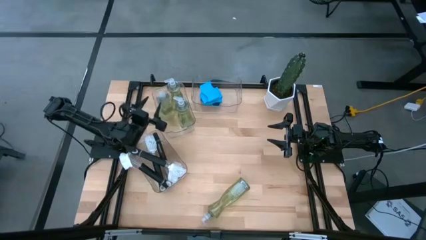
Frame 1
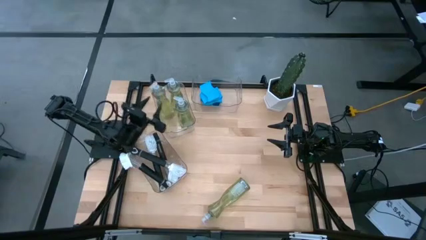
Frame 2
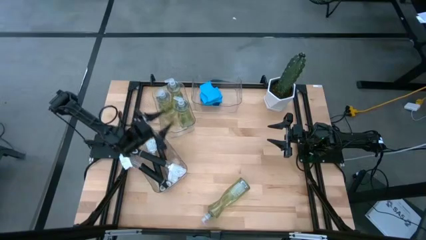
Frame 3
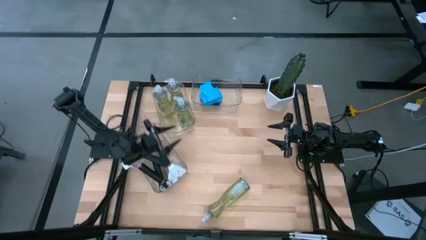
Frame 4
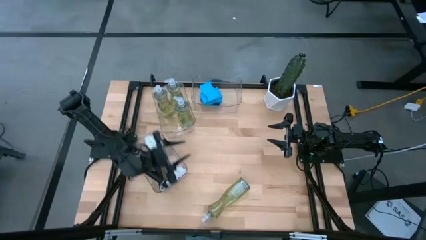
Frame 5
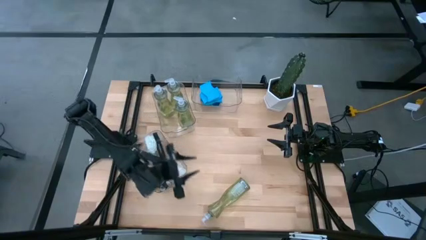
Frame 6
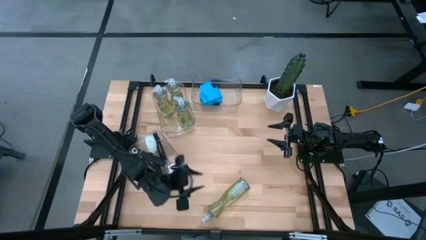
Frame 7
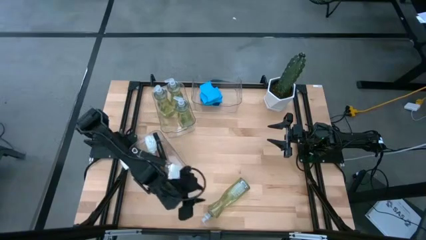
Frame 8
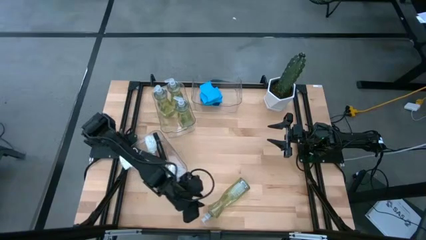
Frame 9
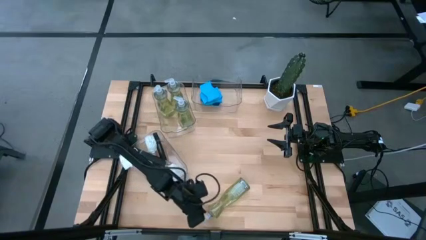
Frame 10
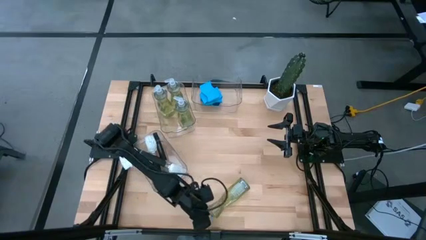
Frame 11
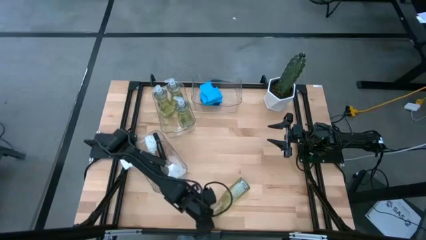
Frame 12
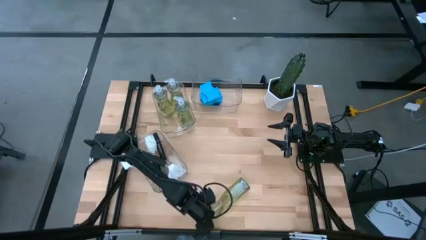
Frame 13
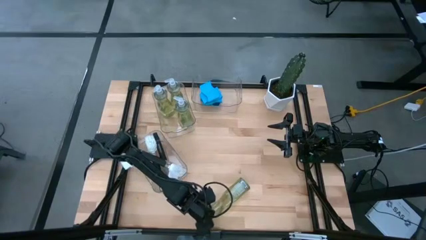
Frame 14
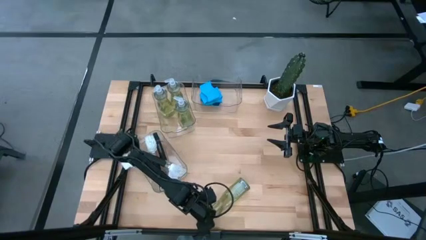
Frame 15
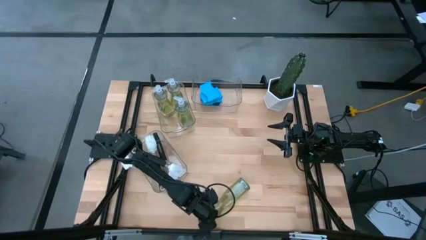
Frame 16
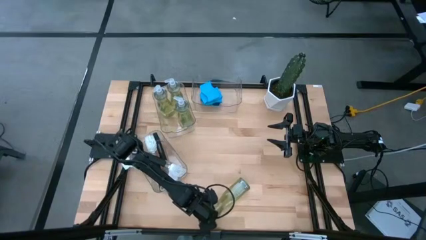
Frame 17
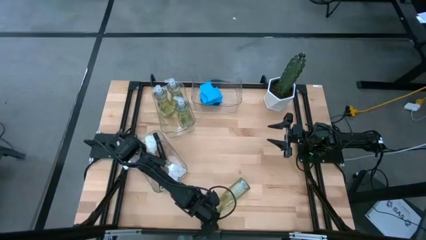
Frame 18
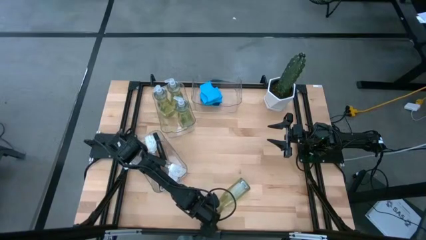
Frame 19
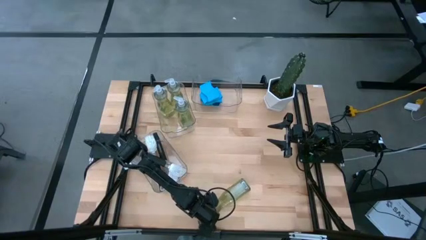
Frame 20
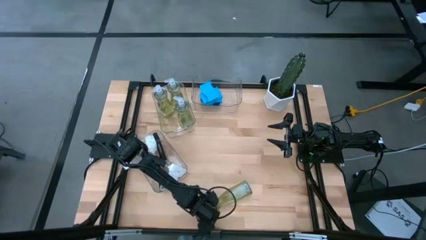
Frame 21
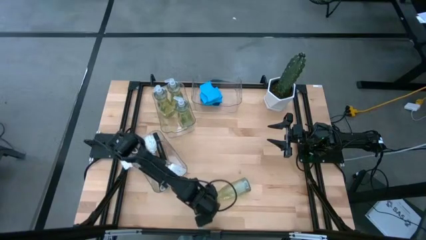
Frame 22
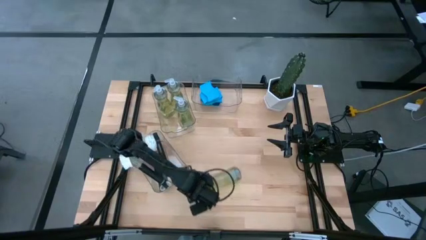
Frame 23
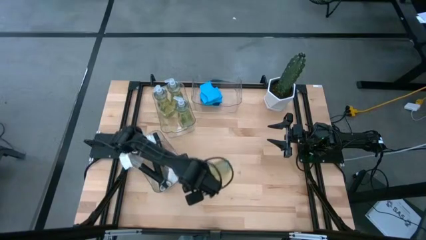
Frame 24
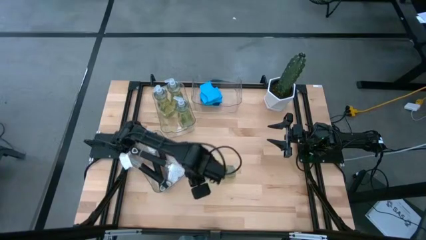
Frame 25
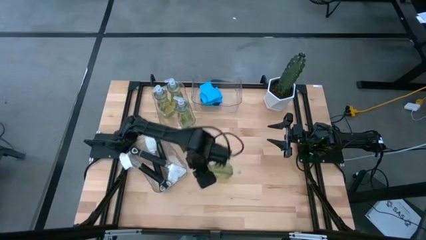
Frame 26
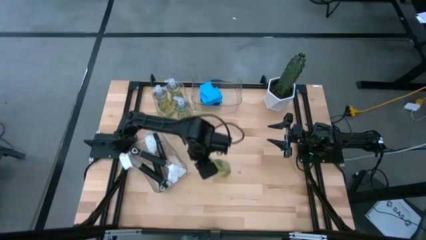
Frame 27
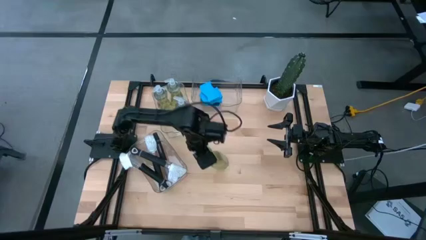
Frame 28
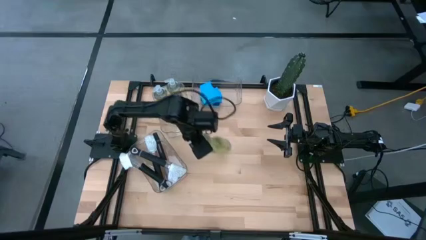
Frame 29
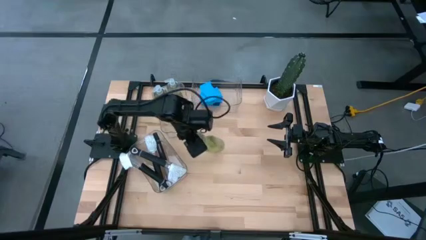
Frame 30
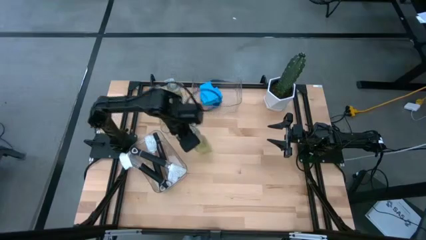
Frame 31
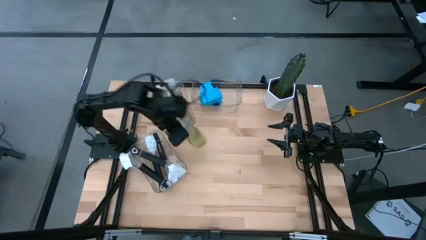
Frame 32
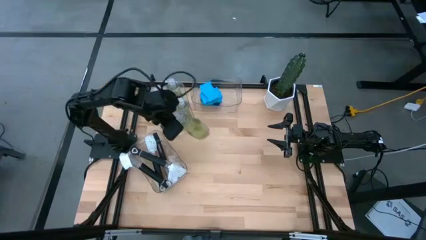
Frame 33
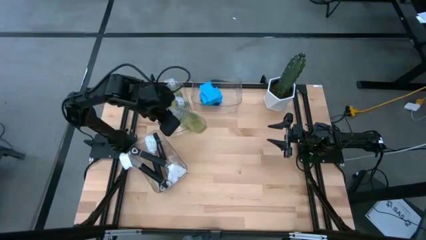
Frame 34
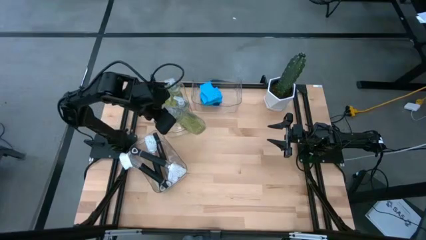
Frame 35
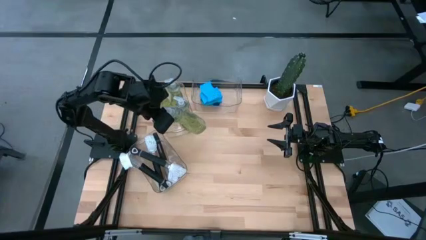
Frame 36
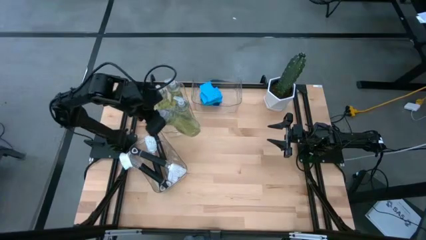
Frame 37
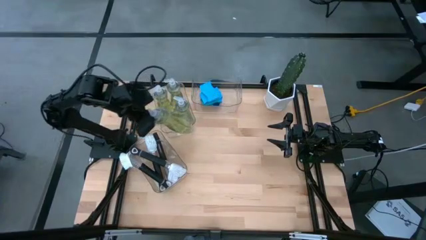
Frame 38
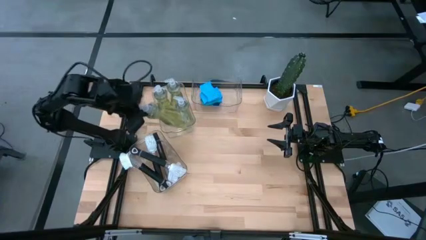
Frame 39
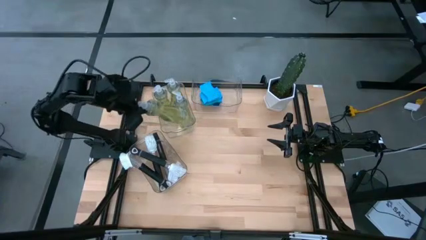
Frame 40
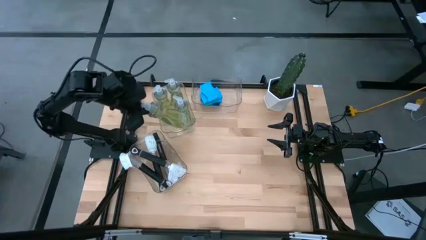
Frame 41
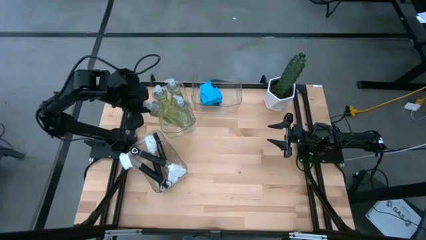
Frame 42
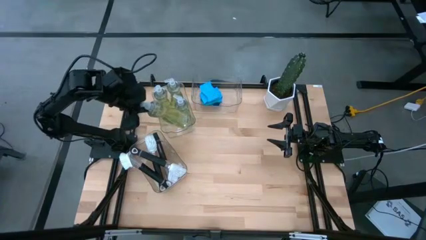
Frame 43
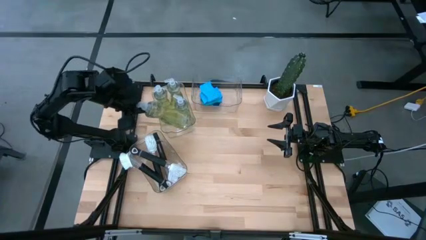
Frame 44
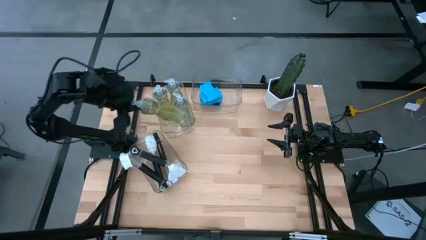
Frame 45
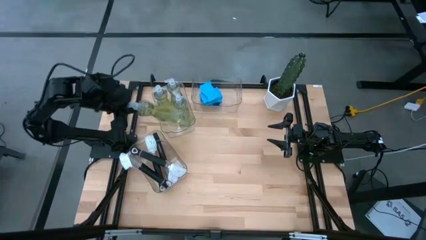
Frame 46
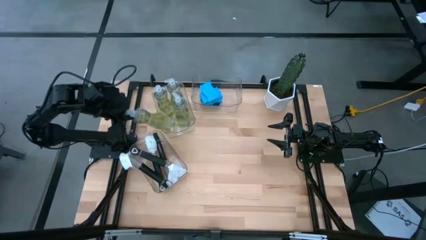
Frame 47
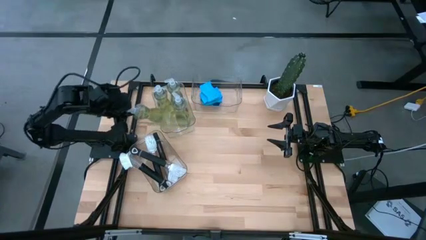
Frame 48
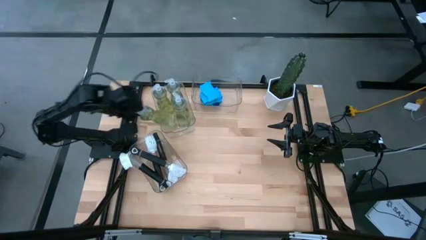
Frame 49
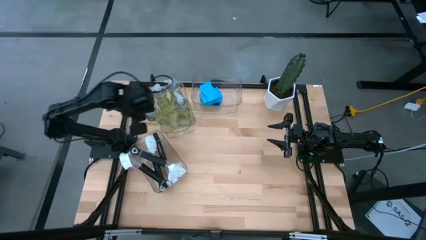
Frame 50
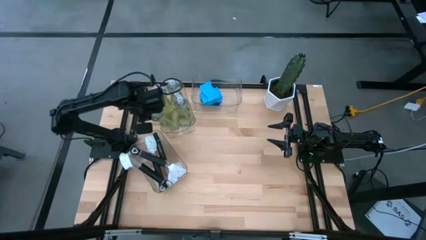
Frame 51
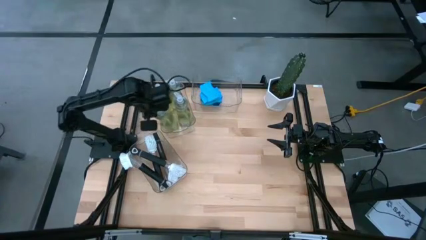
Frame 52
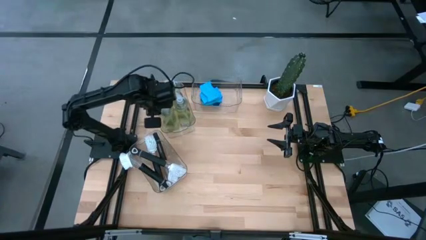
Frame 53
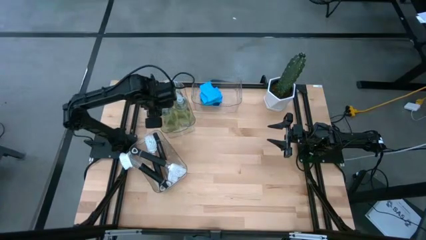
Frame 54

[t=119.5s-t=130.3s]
Task: Pick & Place Kitchen Sink Supplies
Put the yellow dishwashing liquid bottle into the top left transparent bin

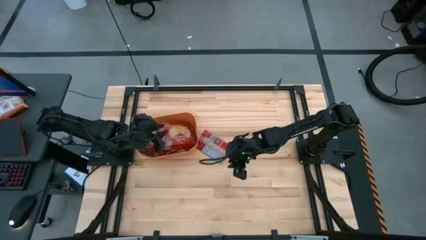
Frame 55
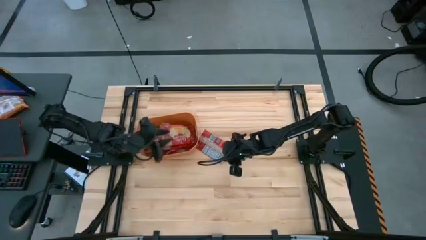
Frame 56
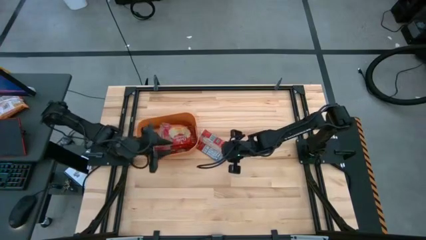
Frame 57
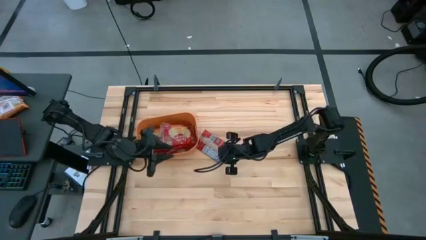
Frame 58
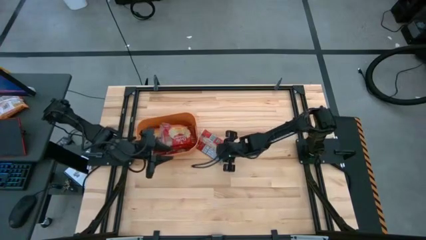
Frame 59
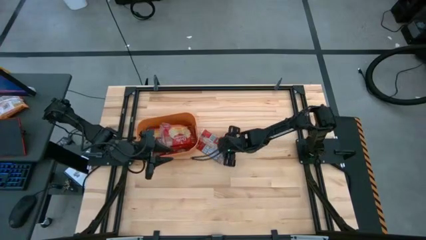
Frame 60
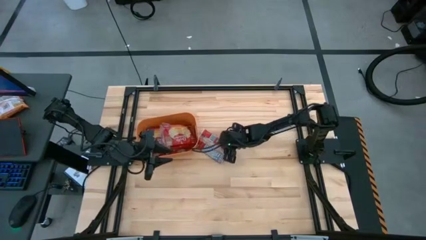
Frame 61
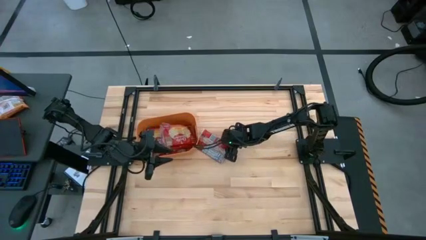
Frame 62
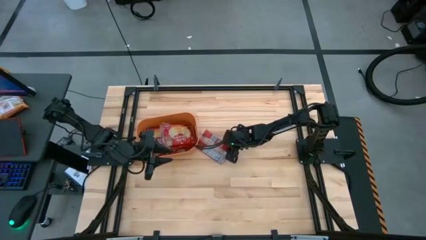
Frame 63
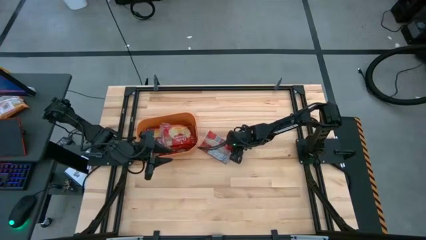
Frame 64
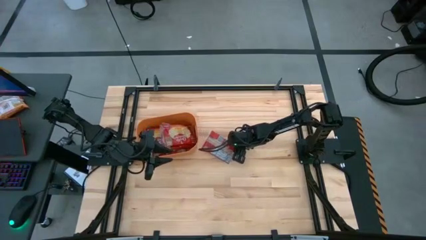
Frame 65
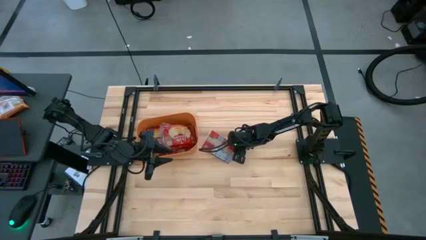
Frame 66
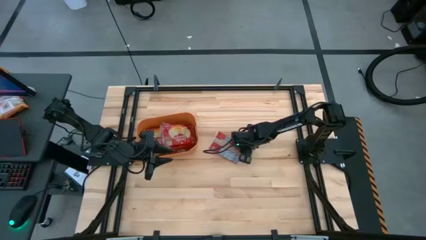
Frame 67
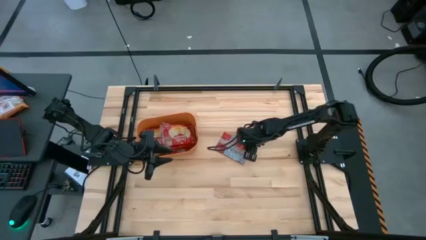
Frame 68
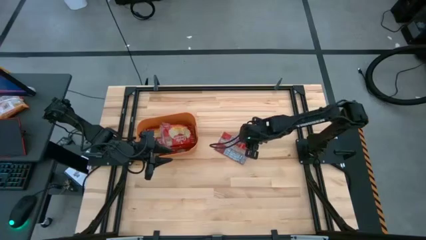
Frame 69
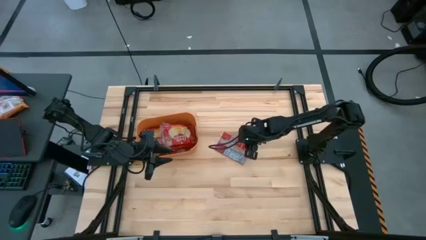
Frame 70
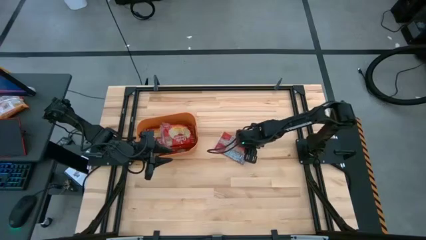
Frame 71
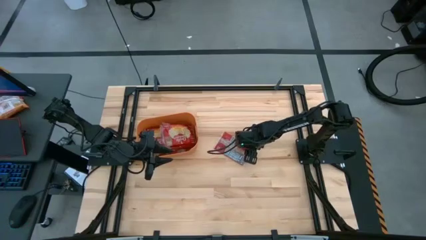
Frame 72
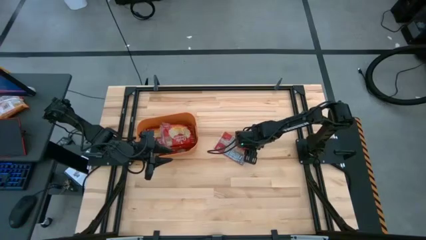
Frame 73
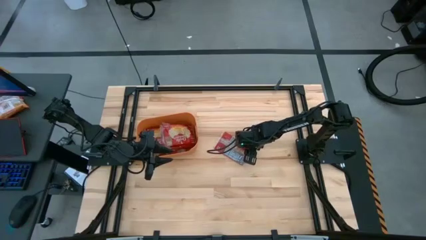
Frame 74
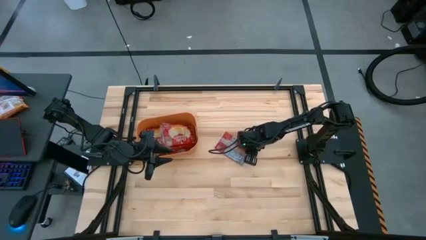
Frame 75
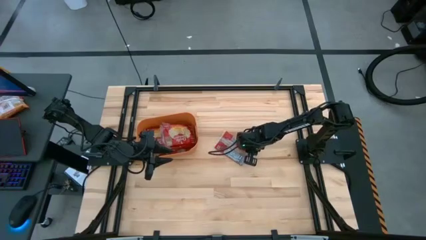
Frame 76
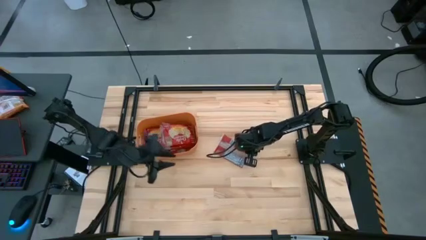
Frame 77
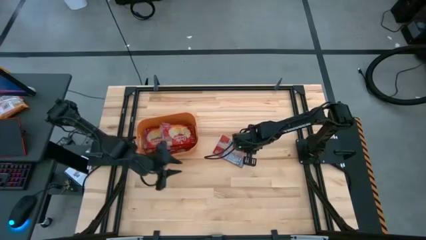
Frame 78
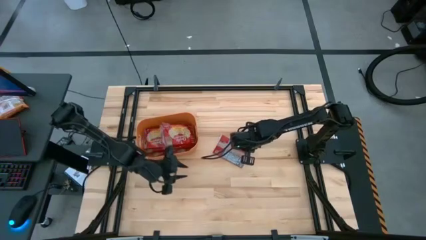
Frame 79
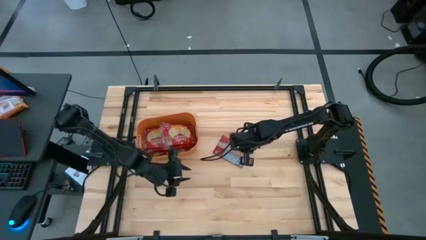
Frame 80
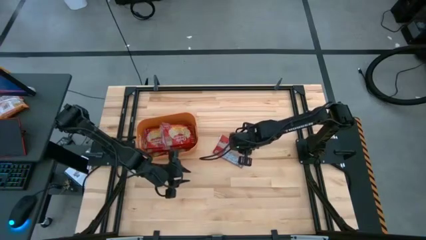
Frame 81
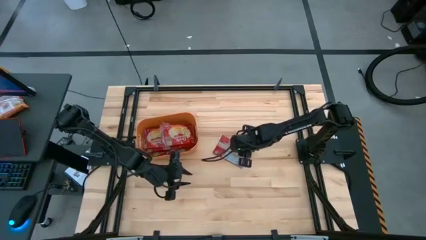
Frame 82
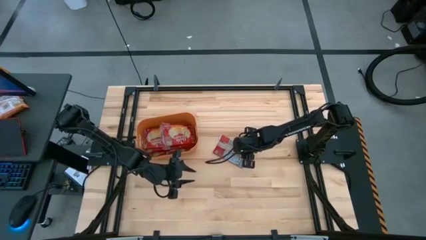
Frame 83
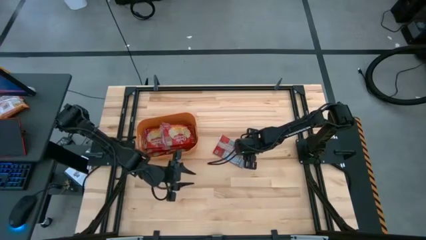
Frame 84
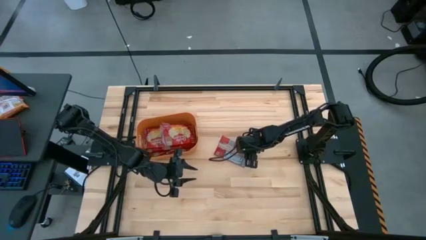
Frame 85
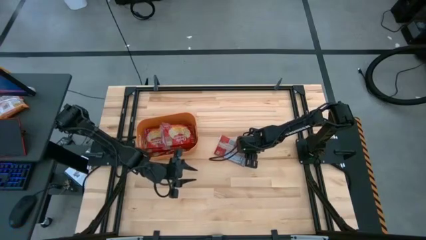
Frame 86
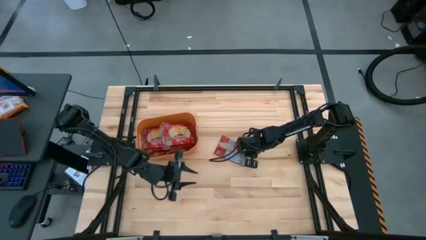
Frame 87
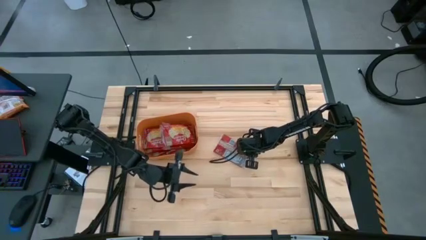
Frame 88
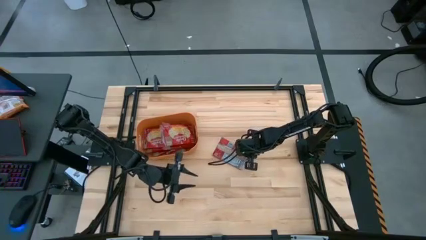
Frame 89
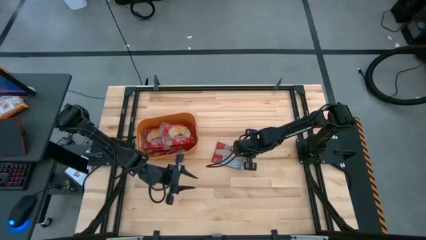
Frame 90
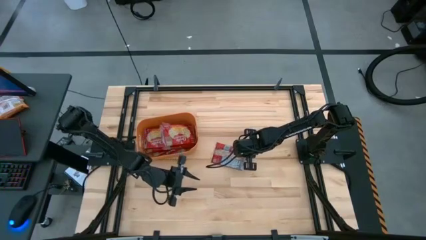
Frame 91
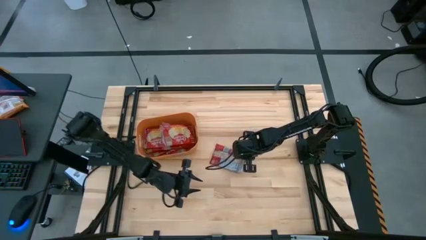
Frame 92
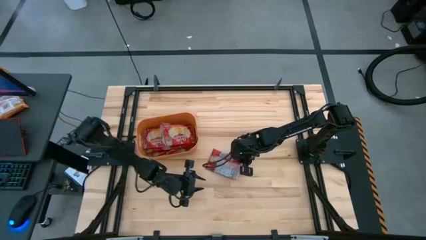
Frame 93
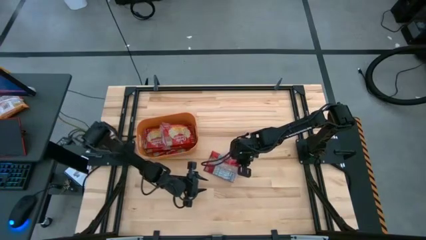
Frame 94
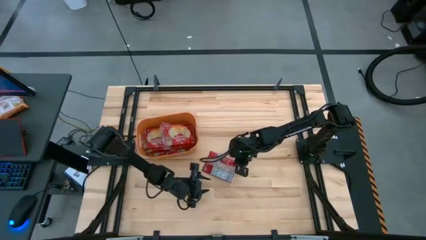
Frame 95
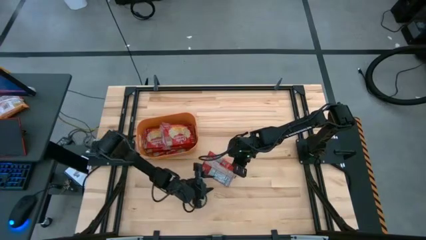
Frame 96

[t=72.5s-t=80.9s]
Task: Sort popcorn bags into baskets
Put the red popcorn bag into the orange bin
